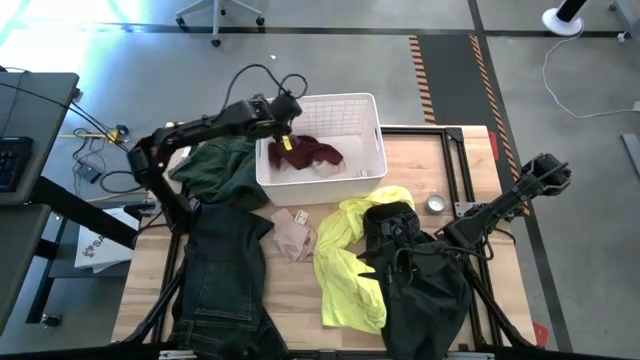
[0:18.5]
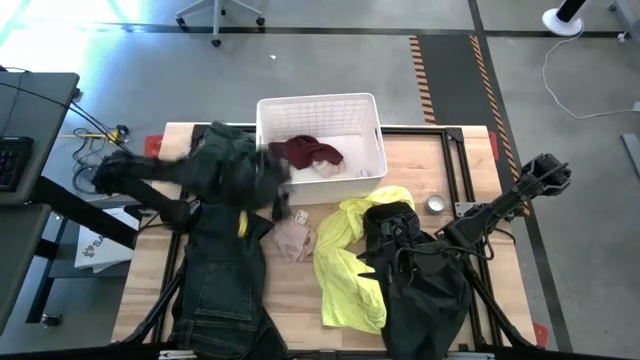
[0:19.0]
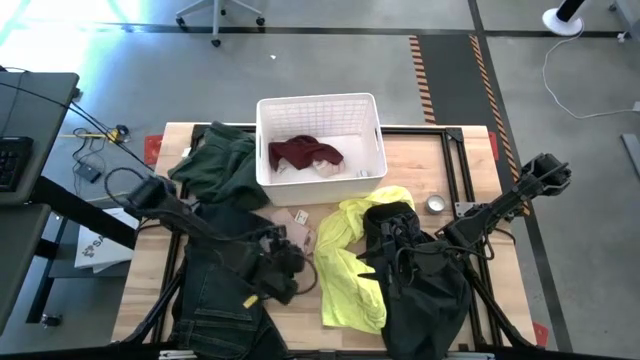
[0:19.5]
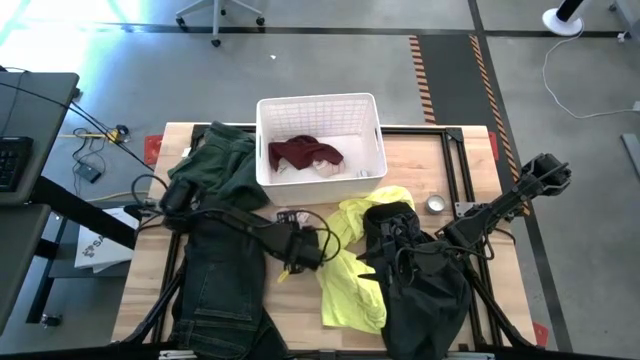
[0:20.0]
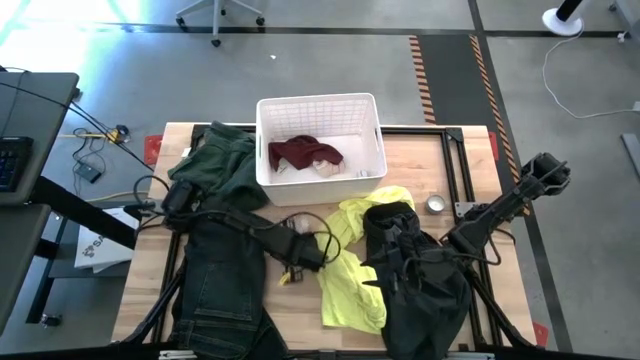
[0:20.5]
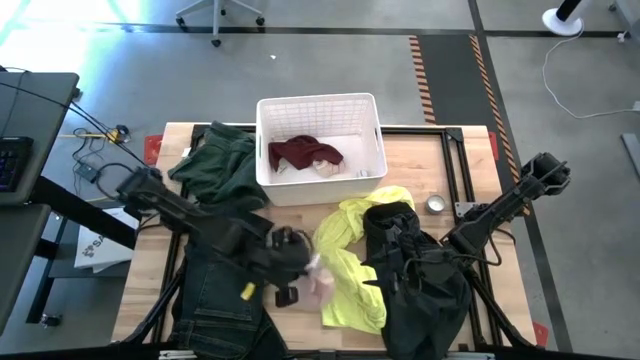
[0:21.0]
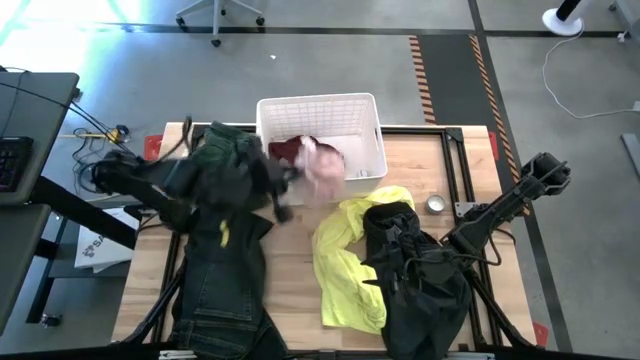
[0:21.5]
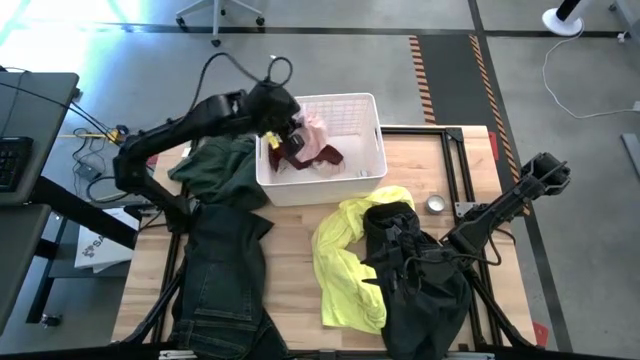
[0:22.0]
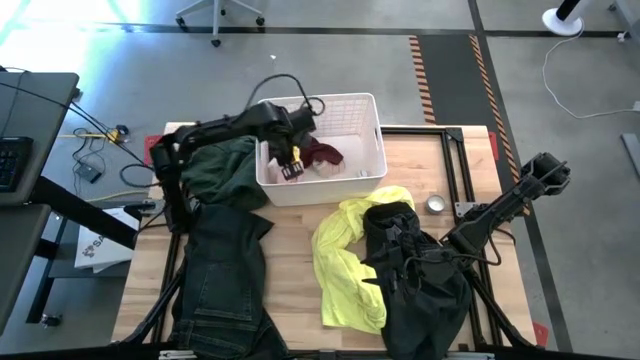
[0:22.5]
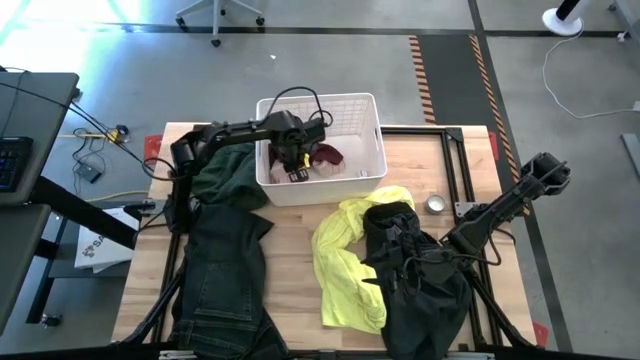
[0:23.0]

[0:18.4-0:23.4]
Task: Sort clothes
Put the pink underwear into the white laundry bin

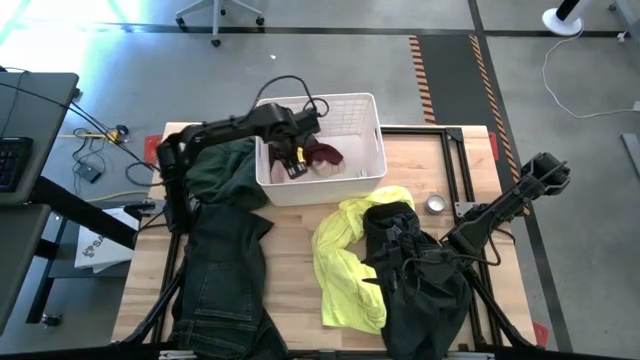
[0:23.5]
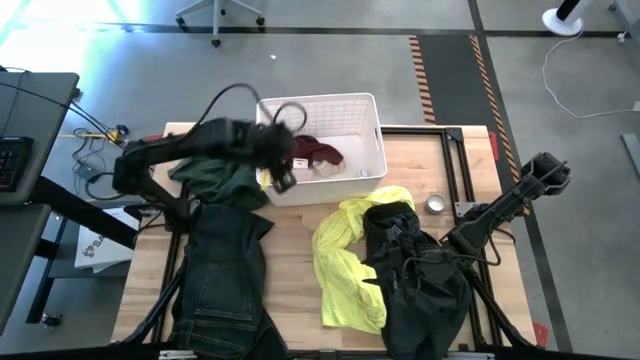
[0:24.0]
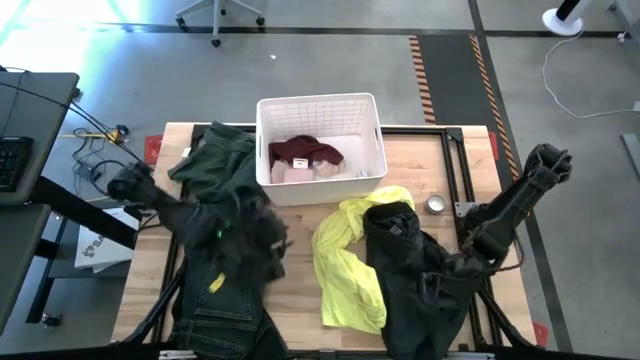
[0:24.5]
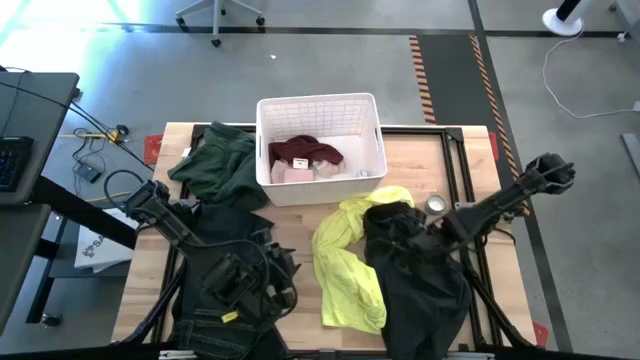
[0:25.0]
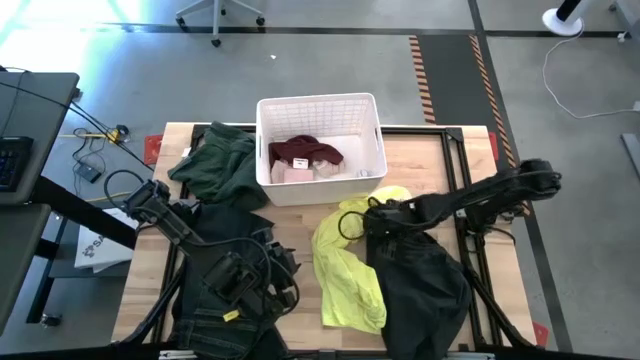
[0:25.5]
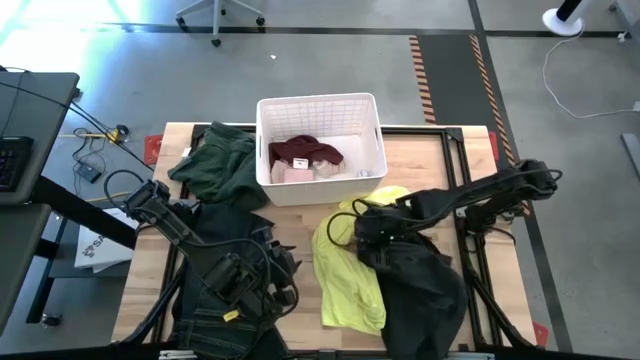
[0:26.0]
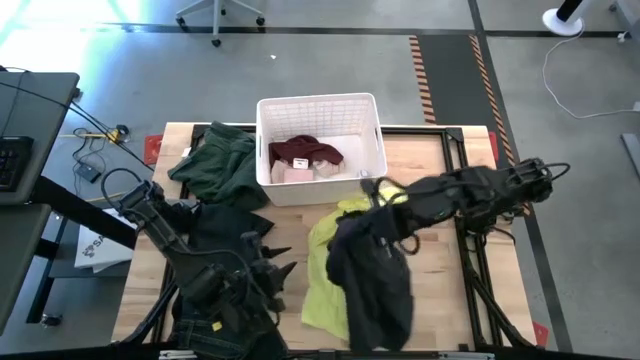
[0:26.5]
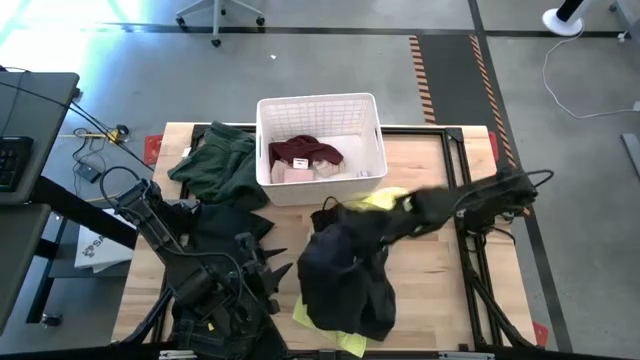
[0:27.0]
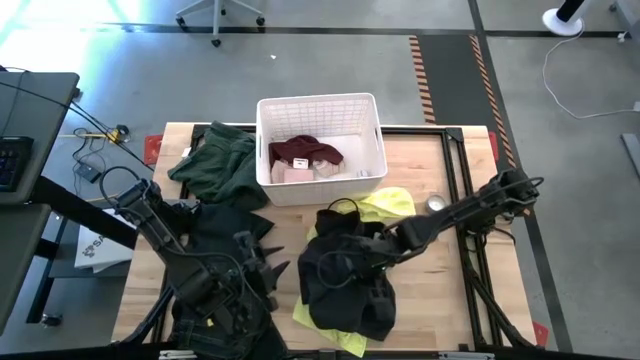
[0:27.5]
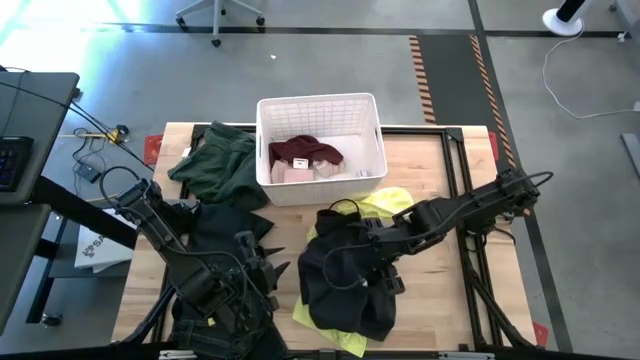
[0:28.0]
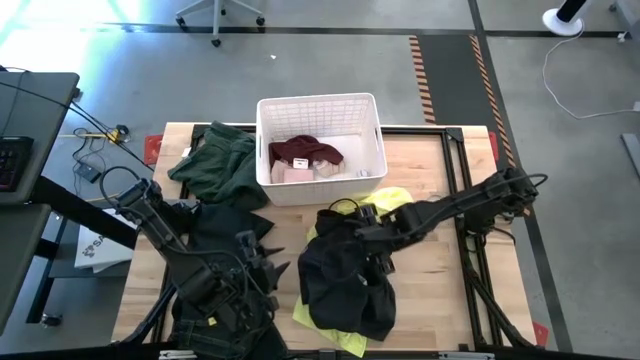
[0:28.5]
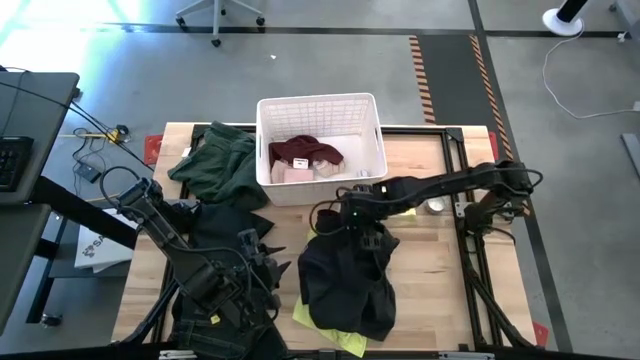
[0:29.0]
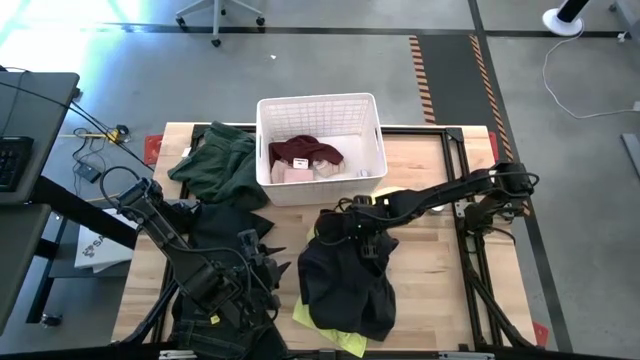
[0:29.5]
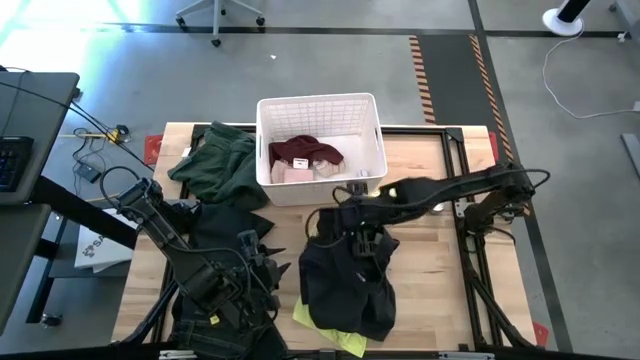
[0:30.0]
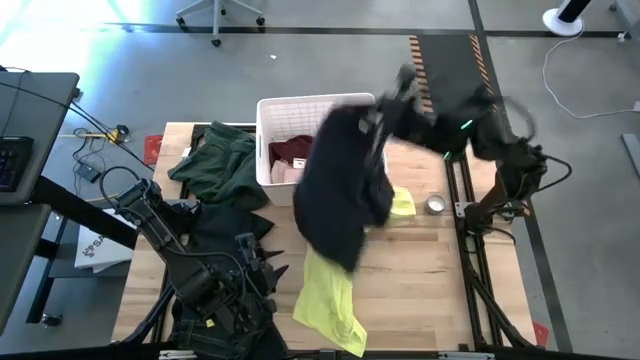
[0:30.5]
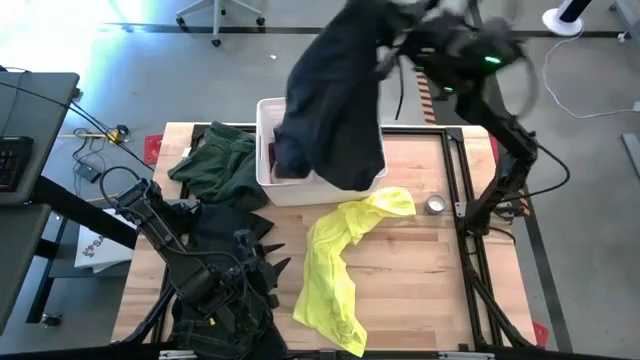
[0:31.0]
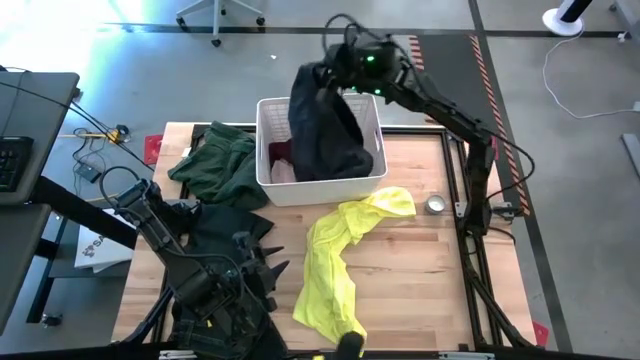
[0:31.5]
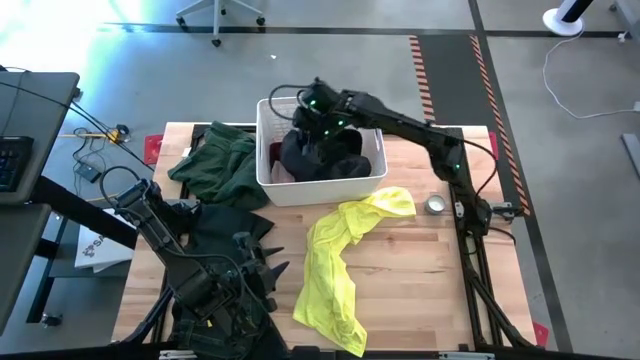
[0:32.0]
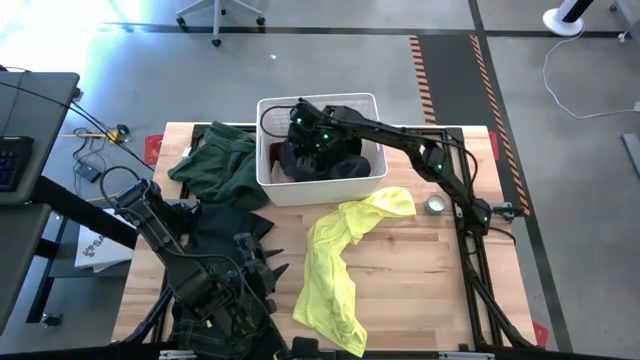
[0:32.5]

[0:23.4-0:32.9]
Put the black shorts into the white laundry bin

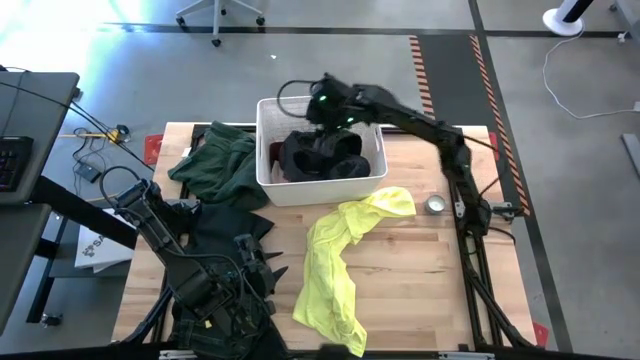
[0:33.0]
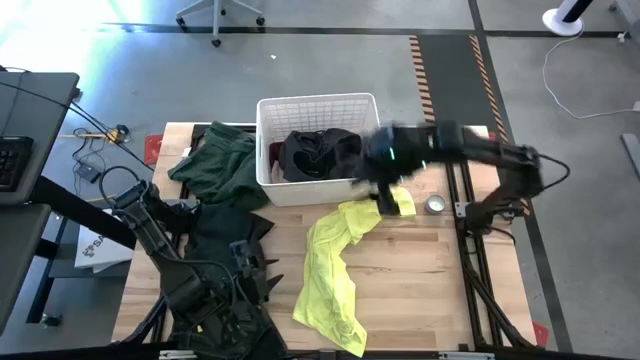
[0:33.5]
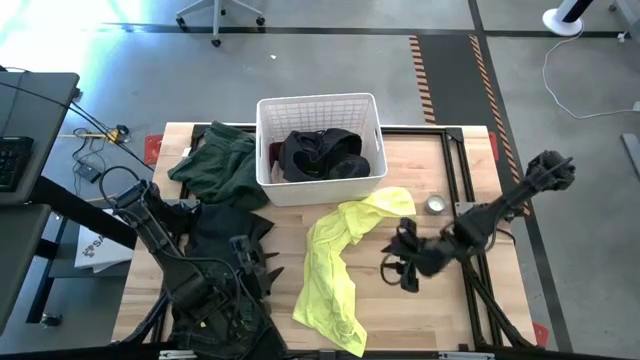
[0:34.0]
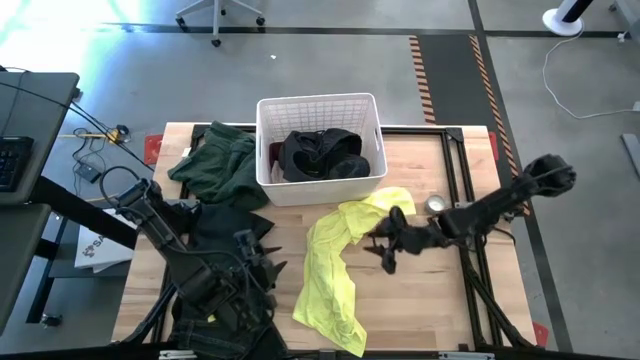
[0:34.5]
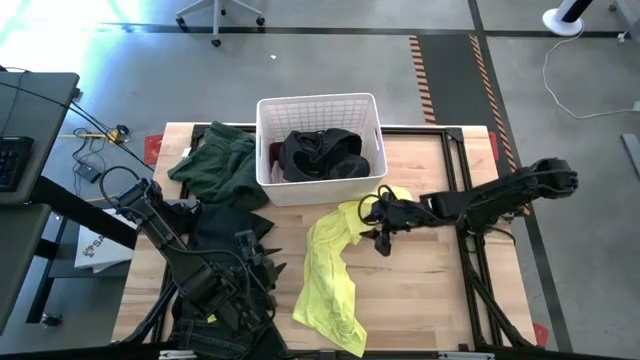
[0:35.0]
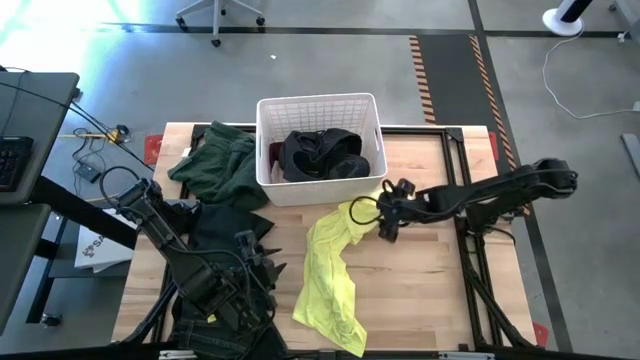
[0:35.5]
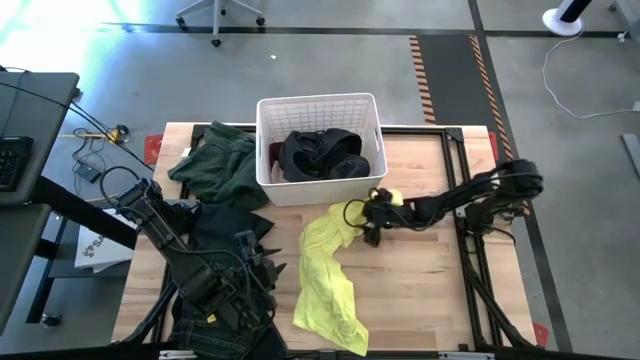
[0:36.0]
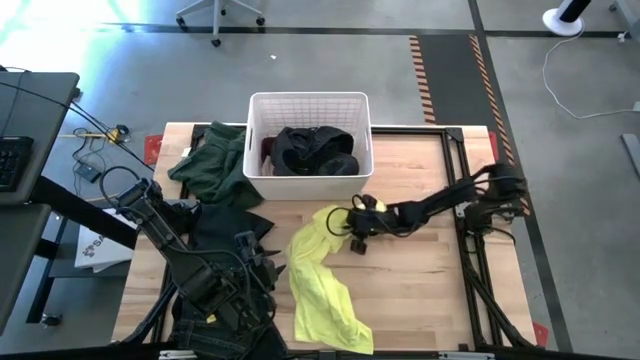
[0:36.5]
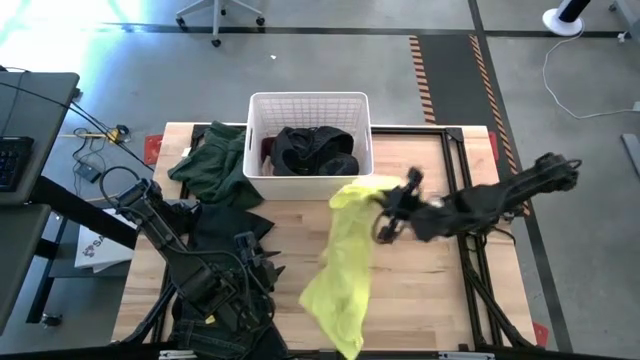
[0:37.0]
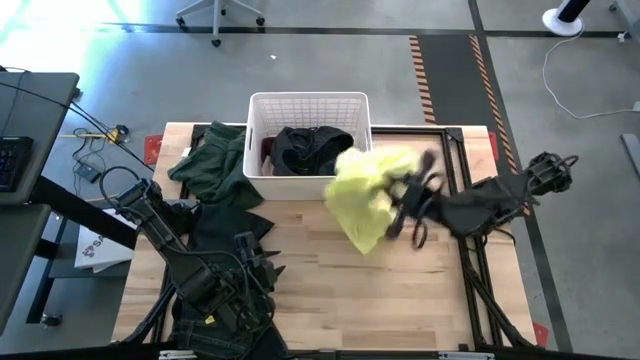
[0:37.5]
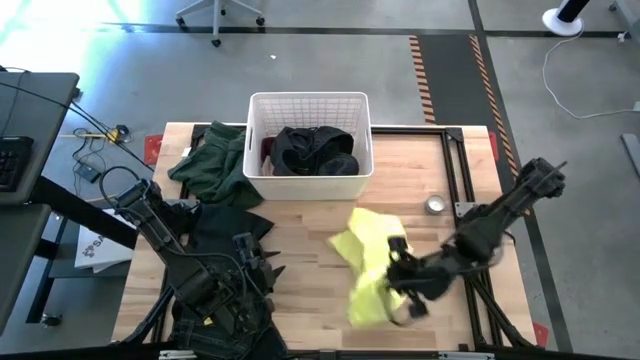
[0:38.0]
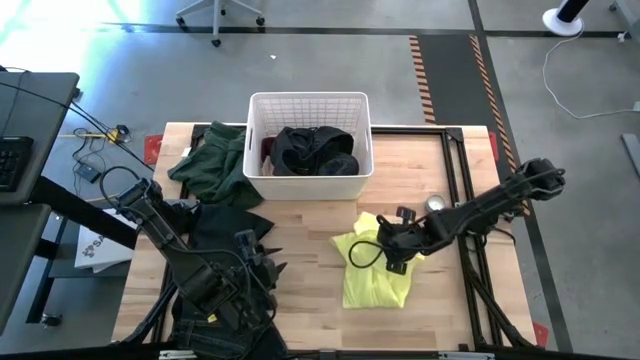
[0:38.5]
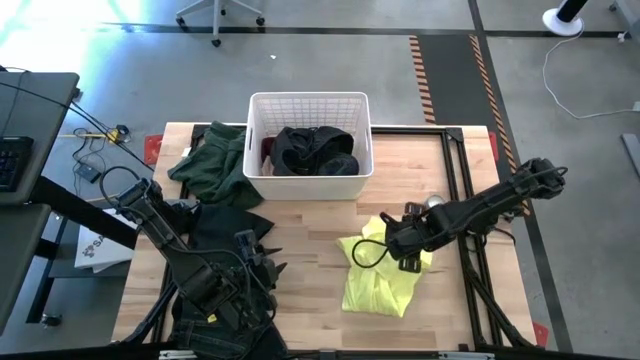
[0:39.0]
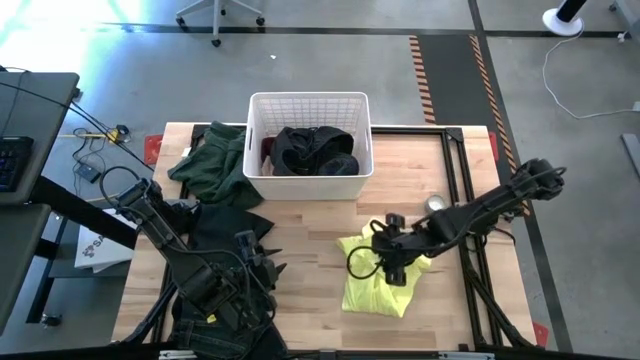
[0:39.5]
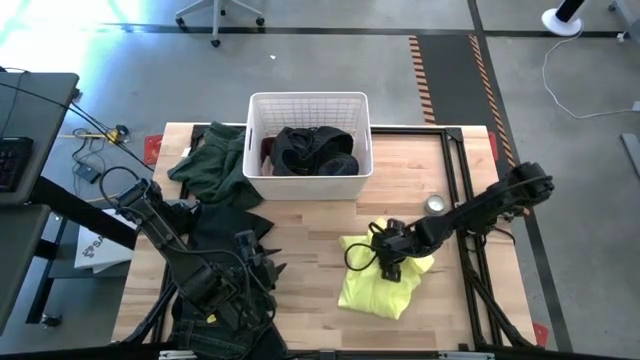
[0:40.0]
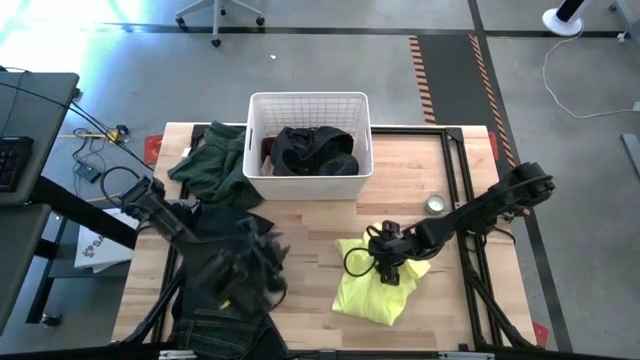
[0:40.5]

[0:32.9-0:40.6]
Adjust the yellow shirt
